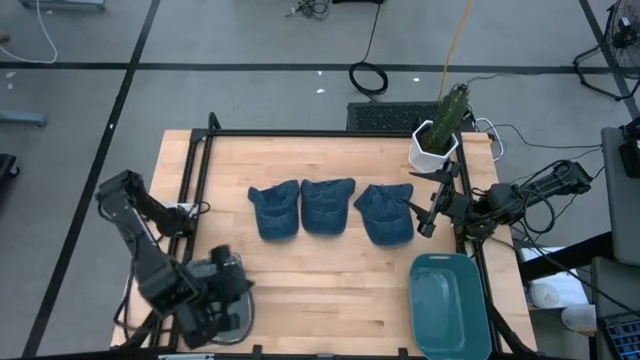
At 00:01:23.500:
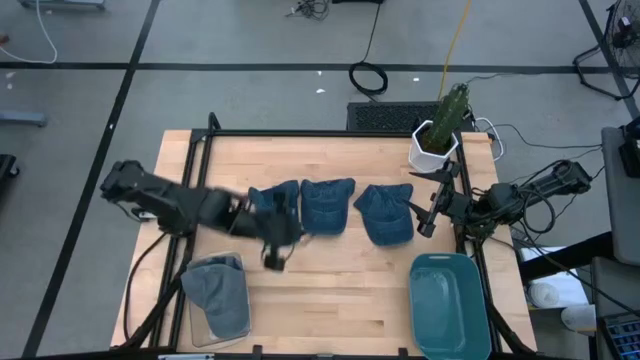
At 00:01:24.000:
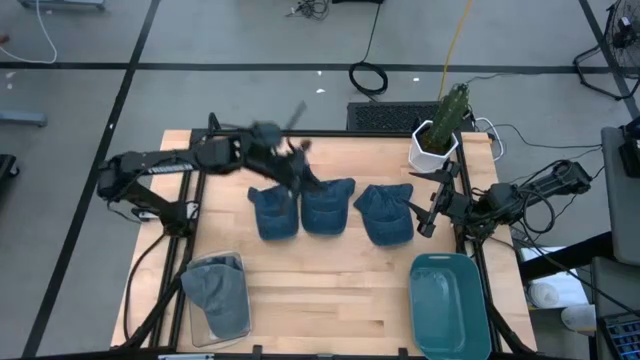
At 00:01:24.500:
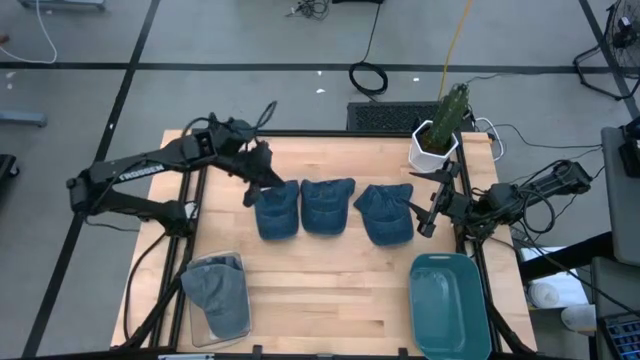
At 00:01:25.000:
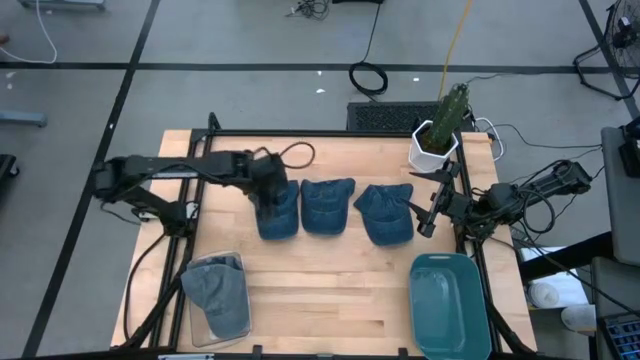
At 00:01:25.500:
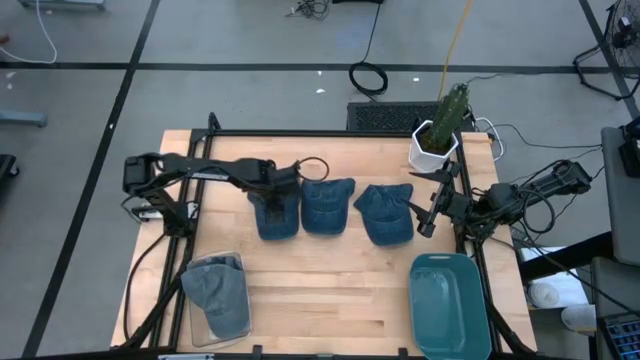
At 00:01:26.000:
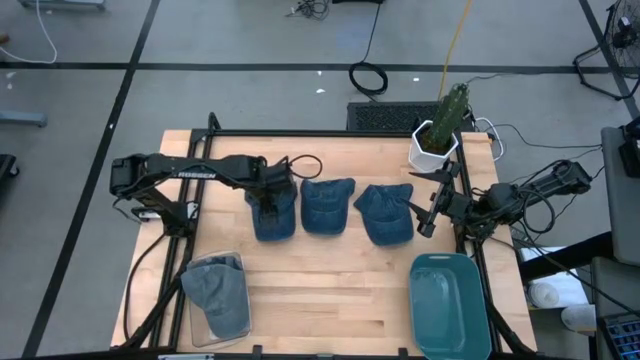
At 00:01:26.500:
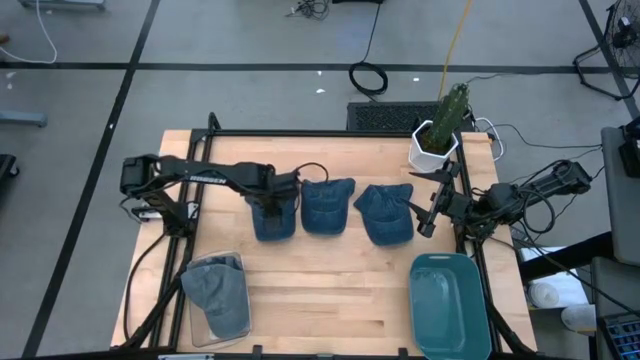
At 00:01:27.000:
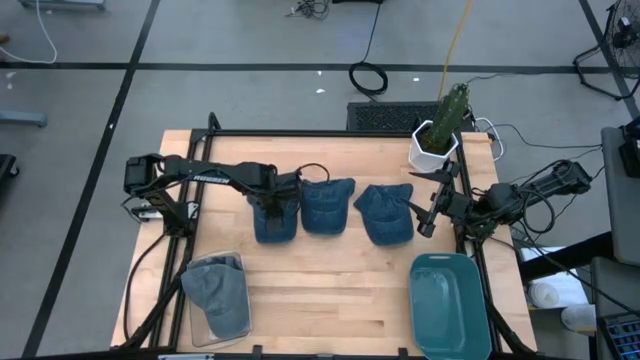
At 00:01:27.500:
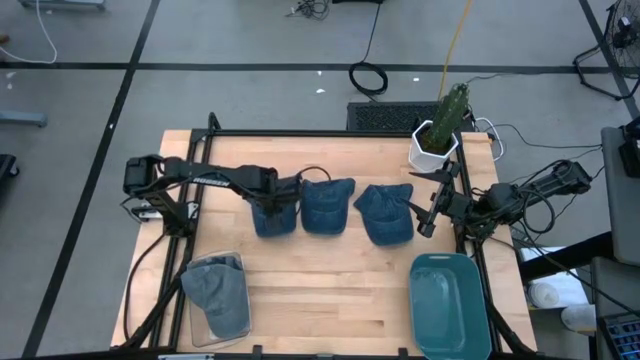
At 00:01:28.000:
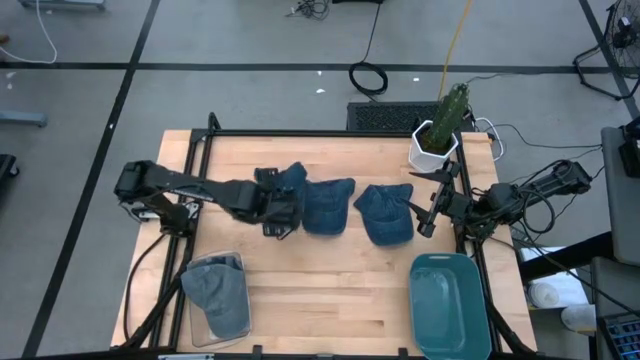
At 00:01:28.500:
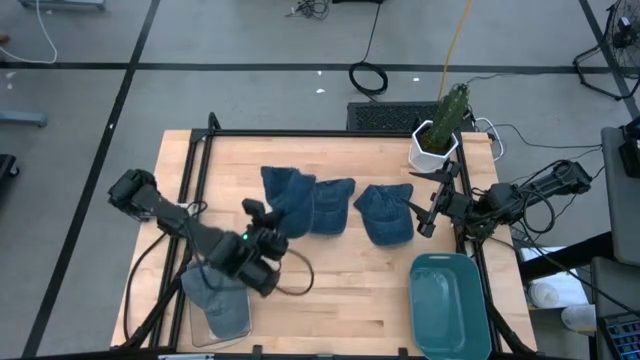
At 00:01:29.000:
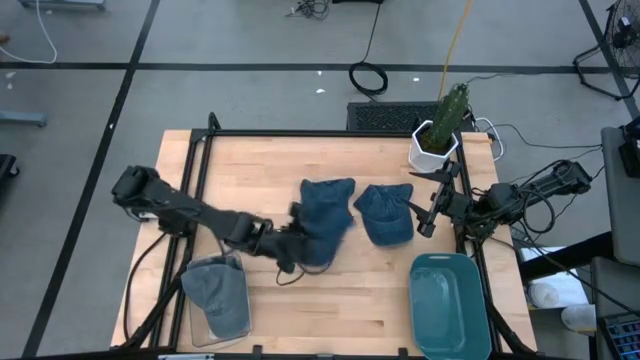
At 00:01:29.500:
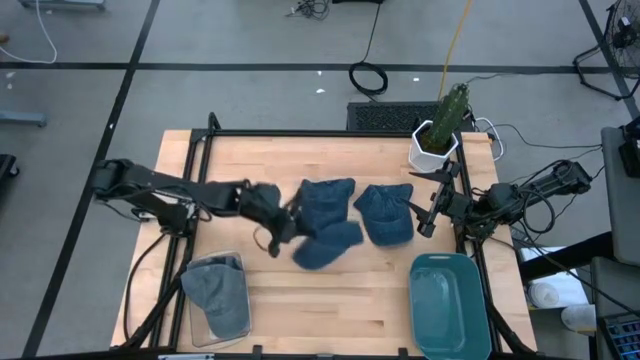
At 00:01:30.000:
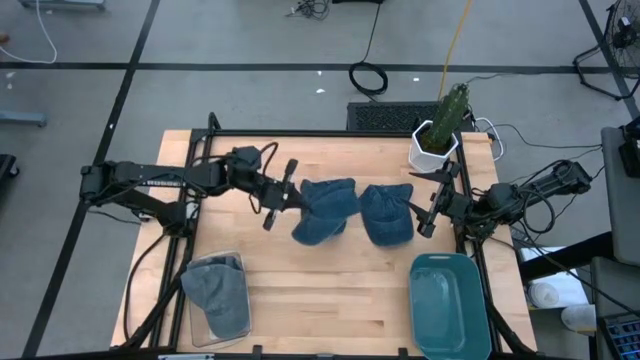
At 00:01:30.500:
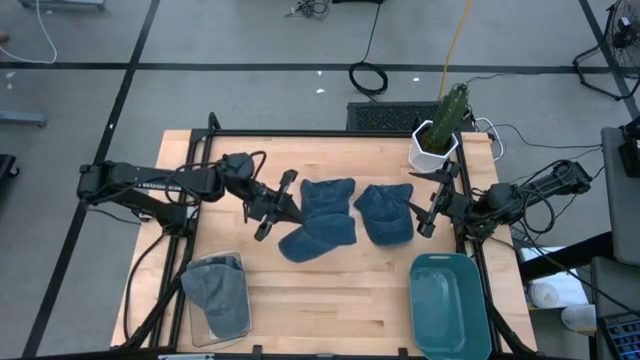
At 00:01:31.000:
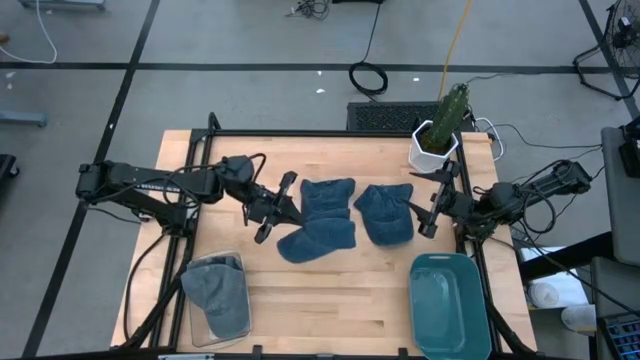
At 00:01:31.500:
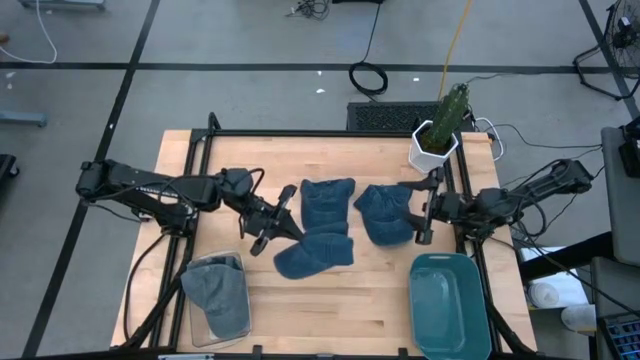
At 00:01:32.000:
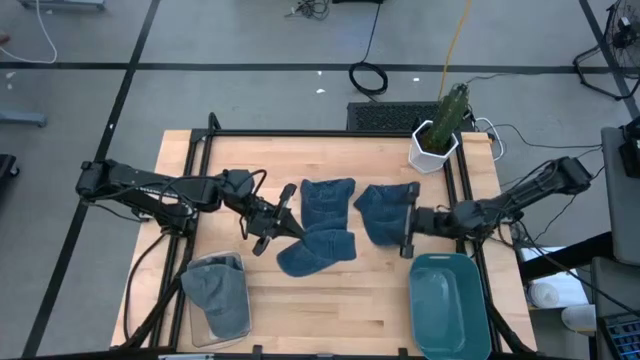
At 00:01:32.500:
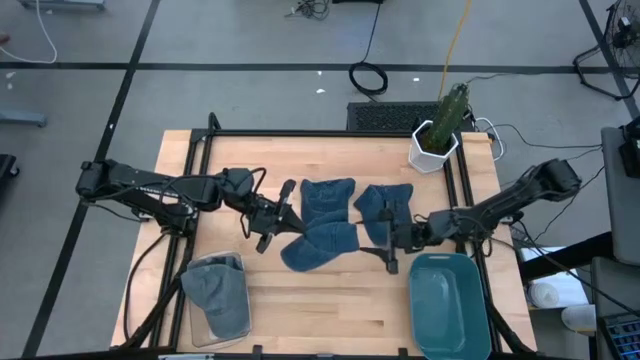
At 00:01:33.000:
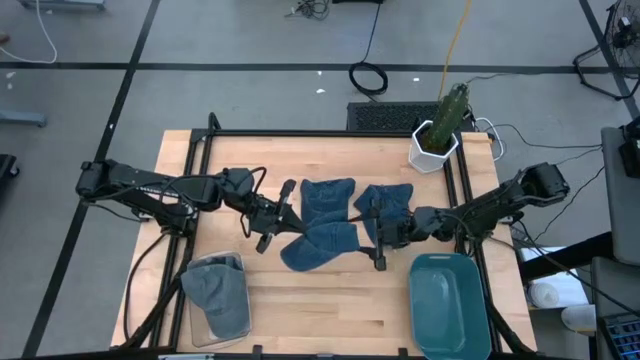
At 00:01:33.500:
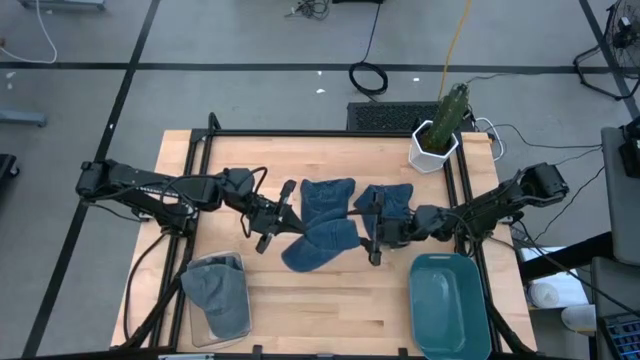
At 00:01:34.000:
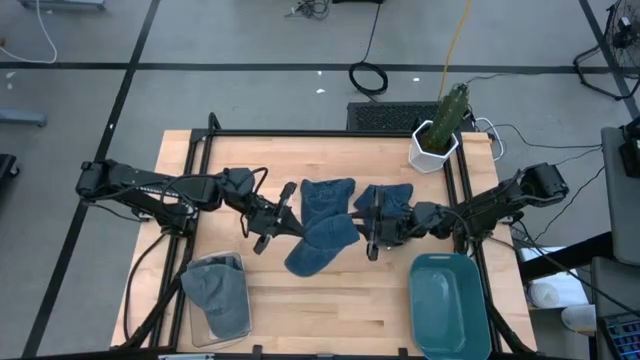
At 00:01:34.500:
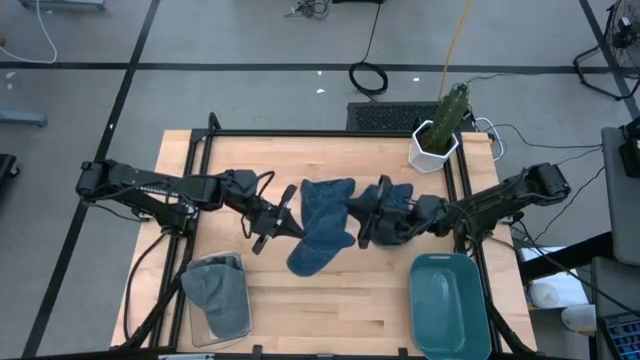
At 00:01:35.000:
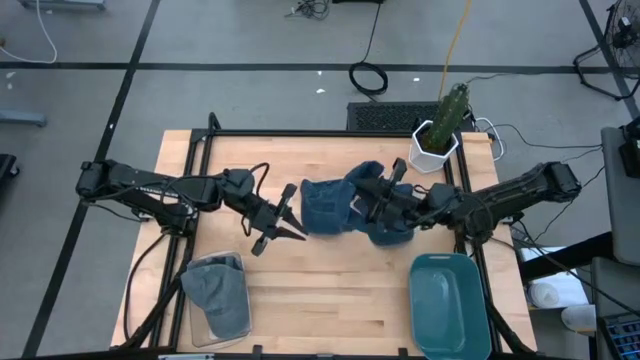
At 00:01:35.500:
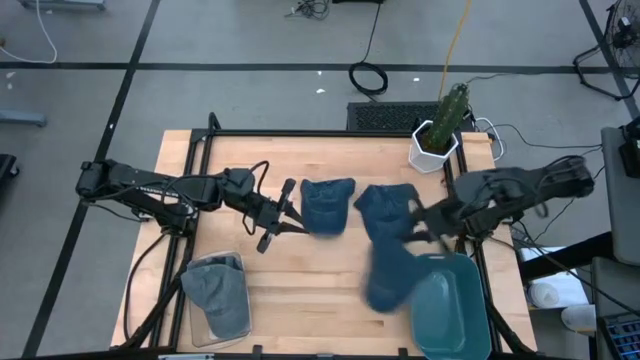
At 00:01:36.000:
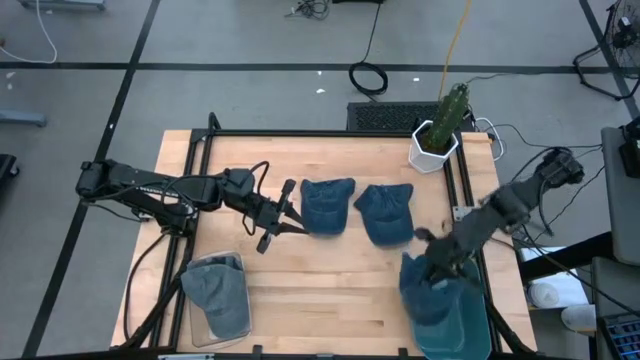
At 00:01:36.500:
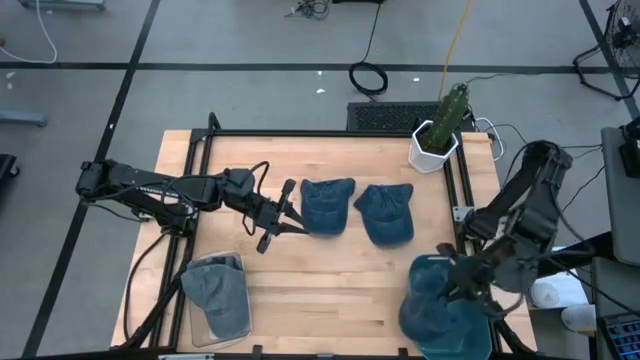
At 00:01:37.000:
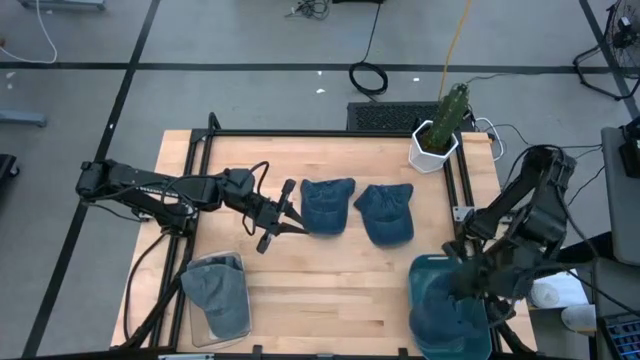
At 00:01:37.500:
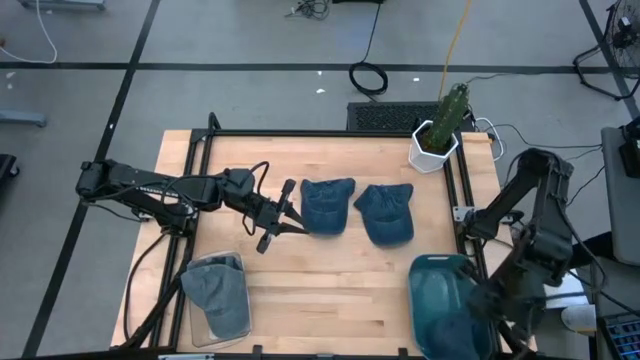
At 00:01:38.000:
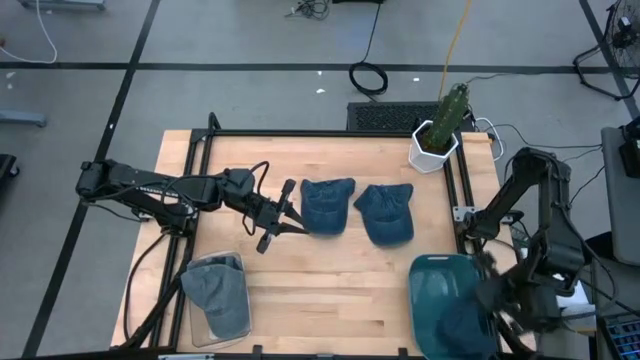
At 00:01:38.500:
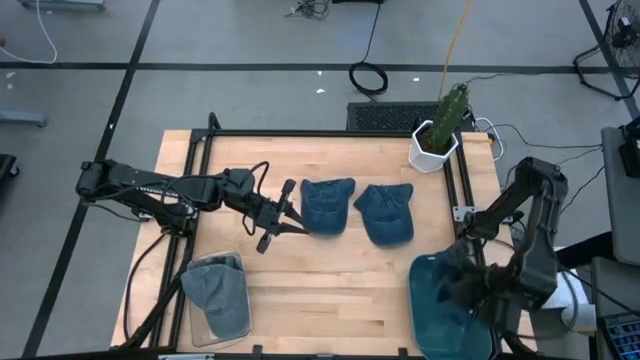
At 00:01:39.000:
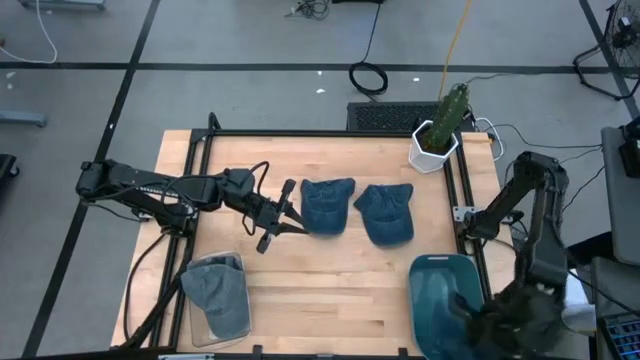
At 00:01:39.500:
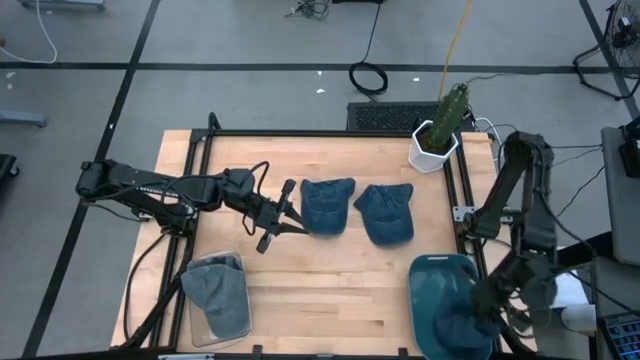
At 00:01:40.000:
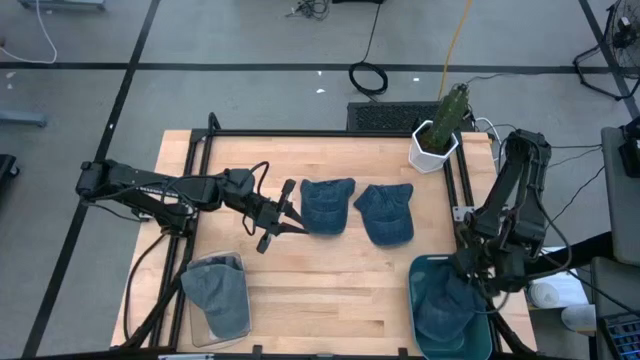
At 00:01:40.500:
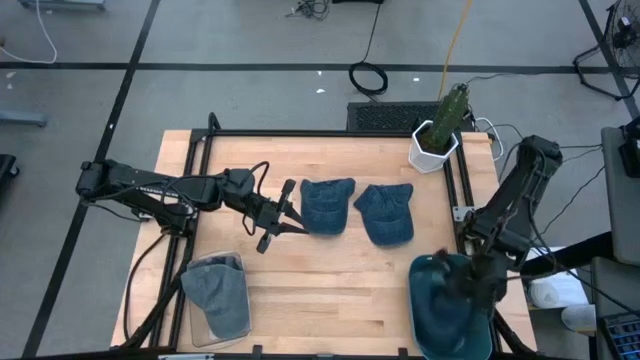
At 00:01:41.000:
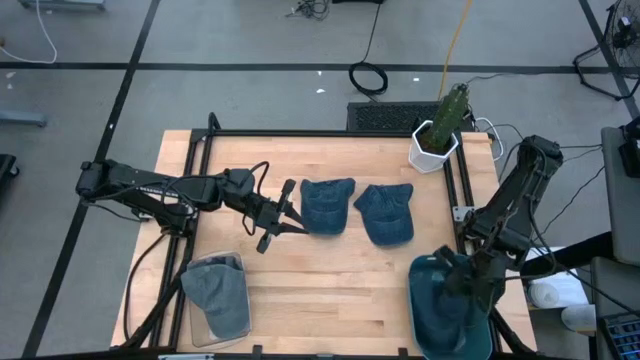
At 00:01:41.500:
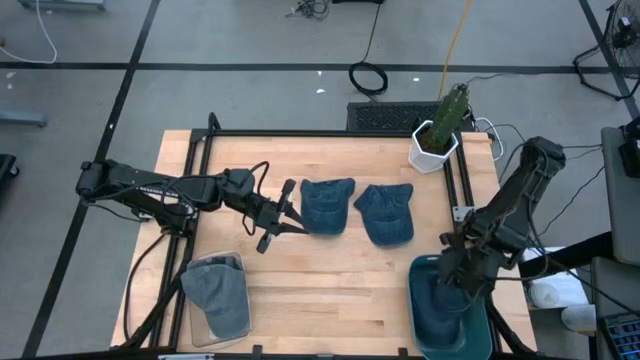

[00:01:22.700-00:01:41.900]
Task: Pick & Place hat
Put the left blue cap into the blue bin
